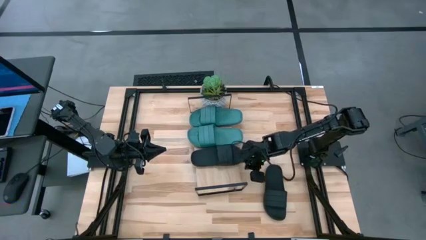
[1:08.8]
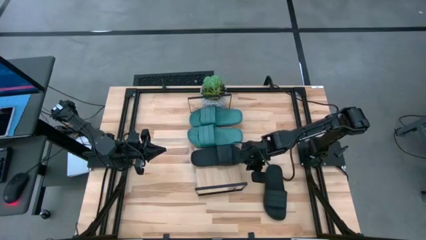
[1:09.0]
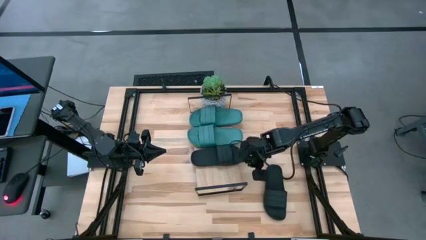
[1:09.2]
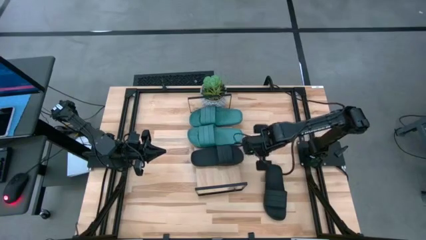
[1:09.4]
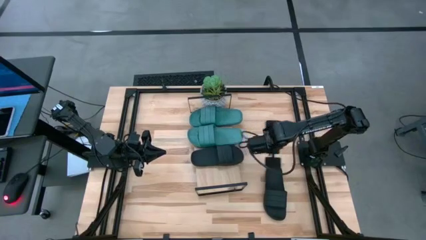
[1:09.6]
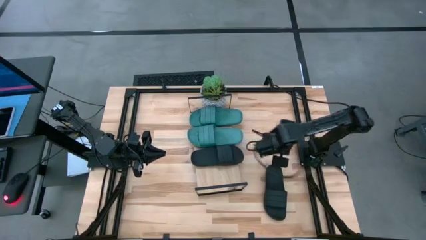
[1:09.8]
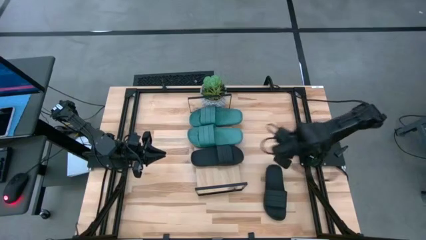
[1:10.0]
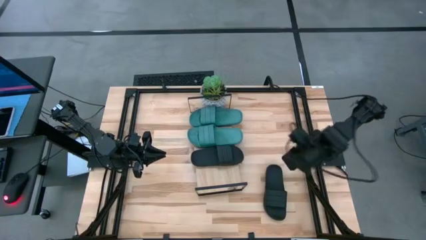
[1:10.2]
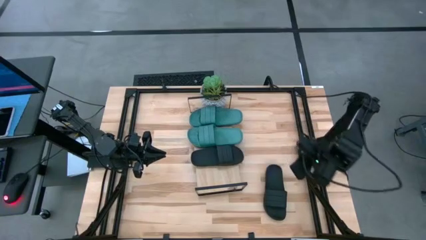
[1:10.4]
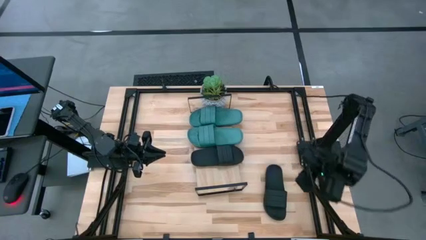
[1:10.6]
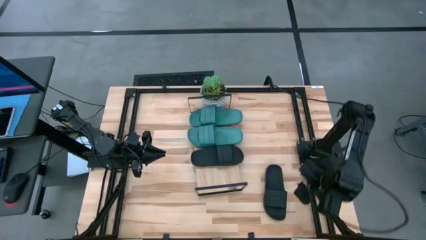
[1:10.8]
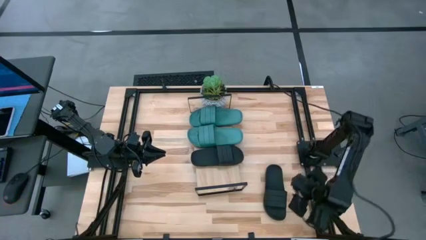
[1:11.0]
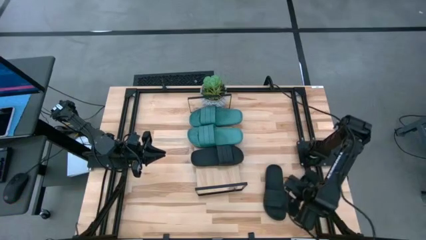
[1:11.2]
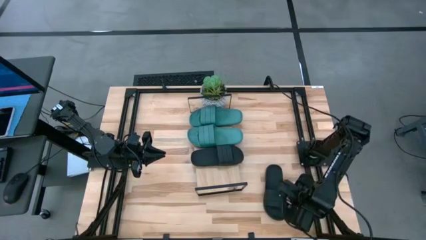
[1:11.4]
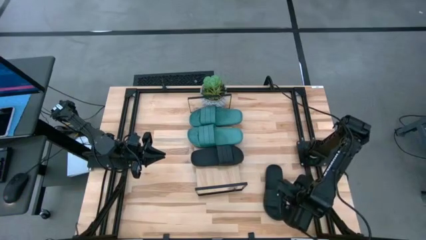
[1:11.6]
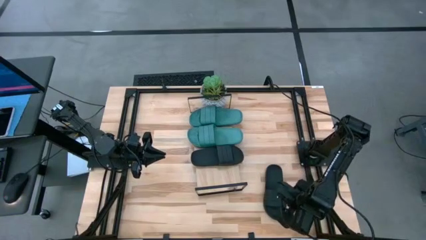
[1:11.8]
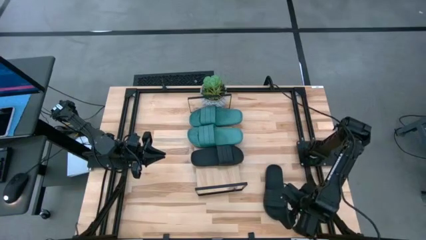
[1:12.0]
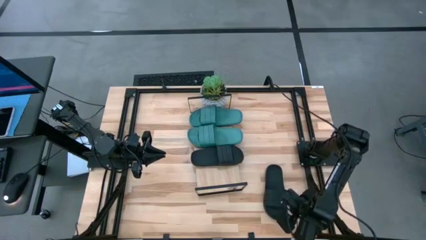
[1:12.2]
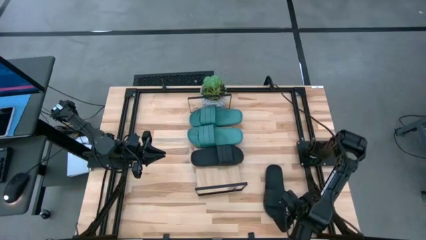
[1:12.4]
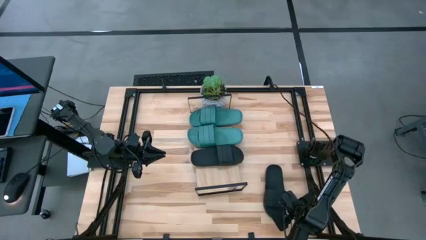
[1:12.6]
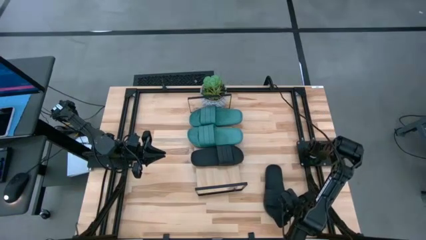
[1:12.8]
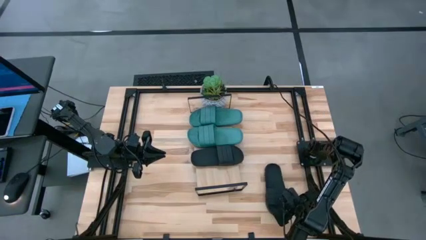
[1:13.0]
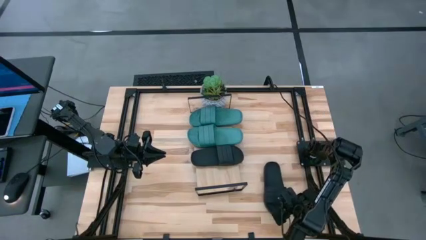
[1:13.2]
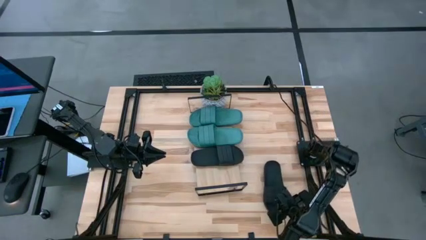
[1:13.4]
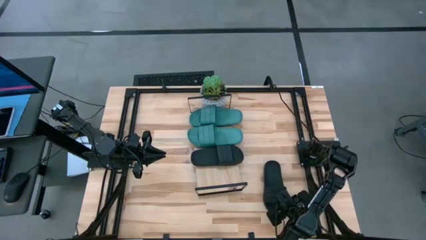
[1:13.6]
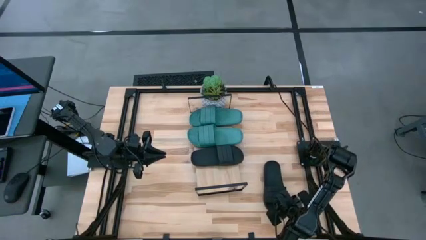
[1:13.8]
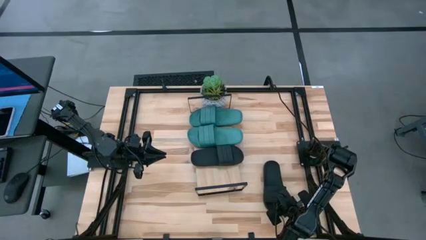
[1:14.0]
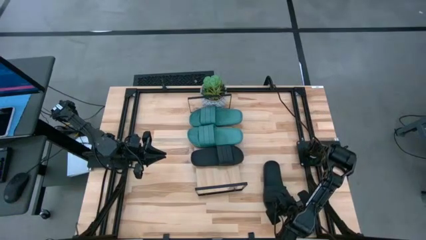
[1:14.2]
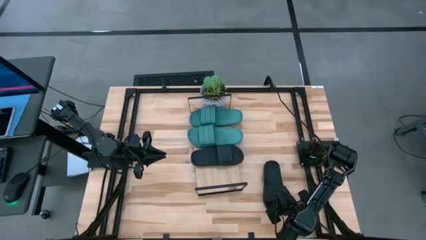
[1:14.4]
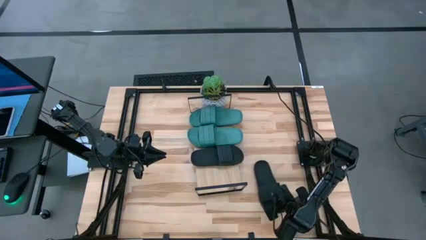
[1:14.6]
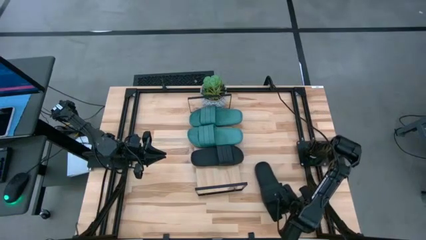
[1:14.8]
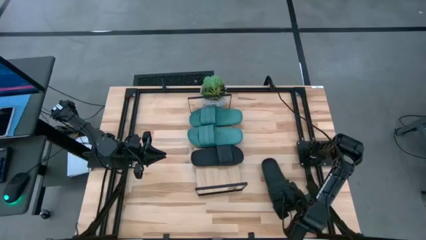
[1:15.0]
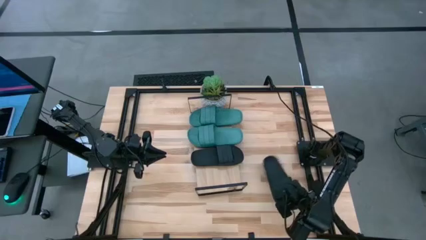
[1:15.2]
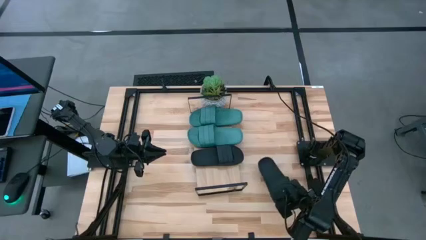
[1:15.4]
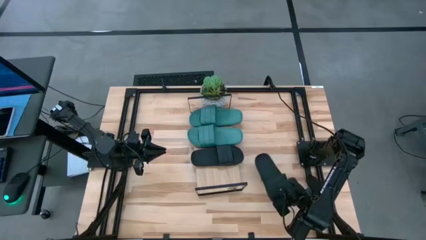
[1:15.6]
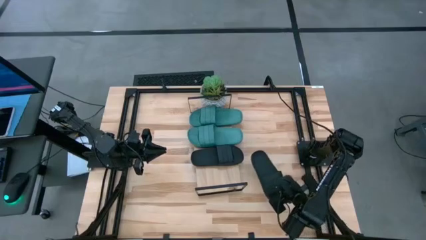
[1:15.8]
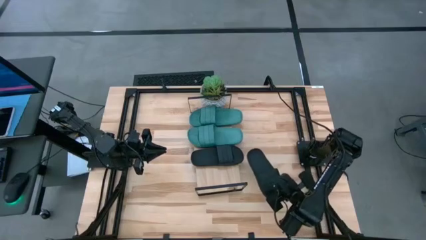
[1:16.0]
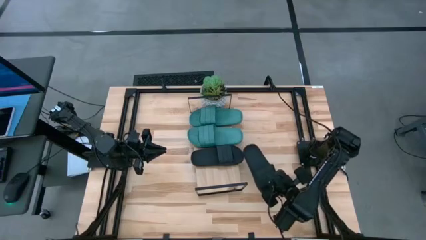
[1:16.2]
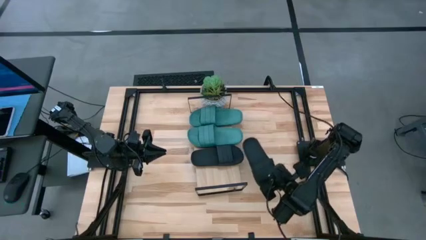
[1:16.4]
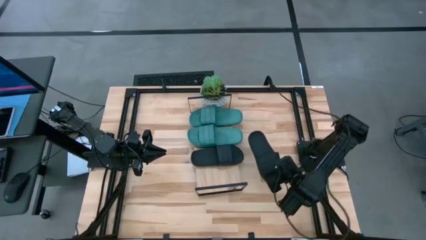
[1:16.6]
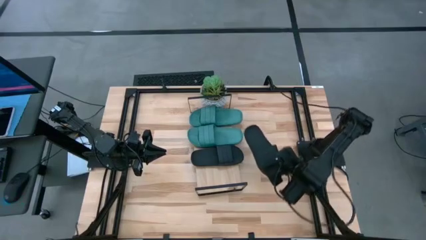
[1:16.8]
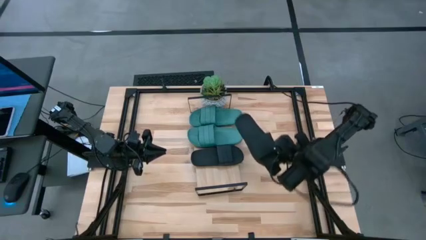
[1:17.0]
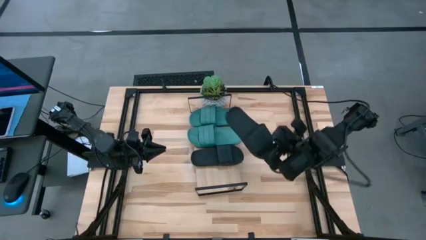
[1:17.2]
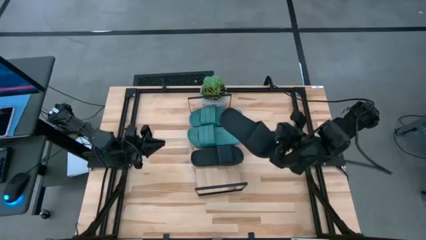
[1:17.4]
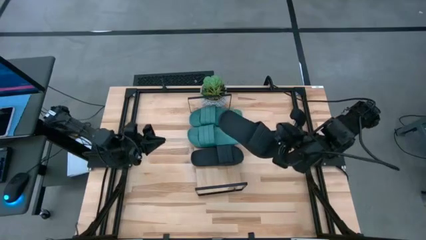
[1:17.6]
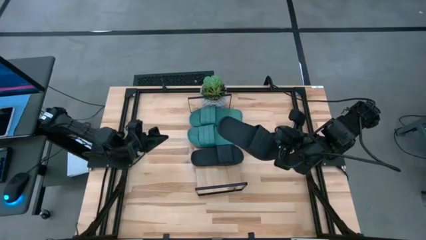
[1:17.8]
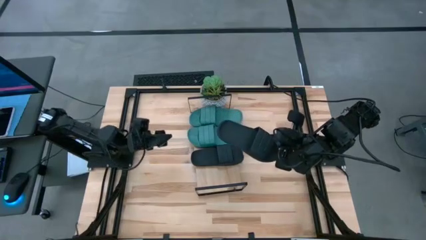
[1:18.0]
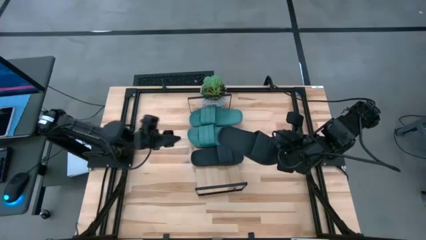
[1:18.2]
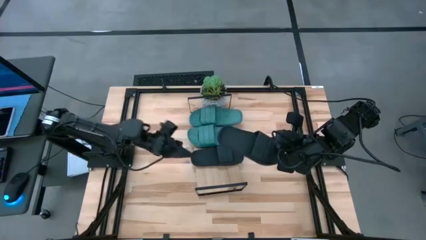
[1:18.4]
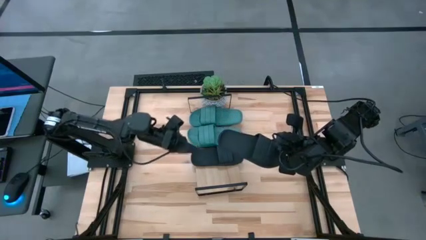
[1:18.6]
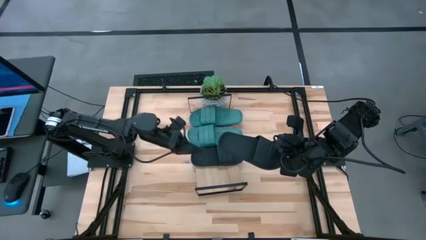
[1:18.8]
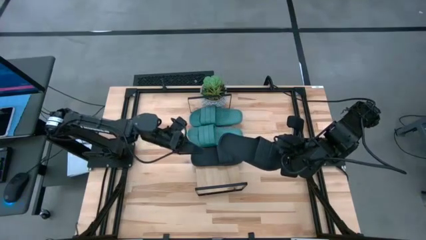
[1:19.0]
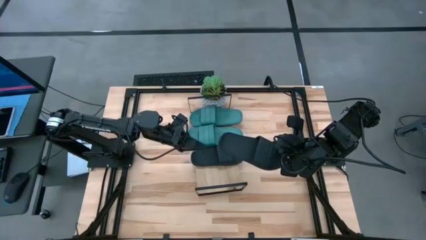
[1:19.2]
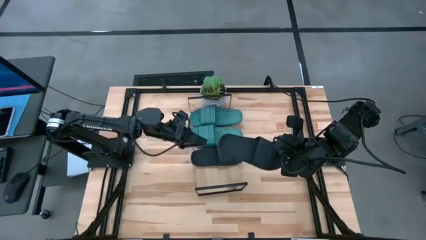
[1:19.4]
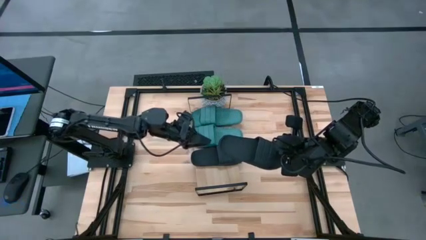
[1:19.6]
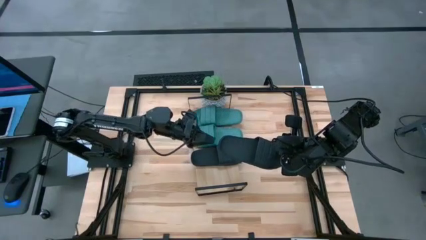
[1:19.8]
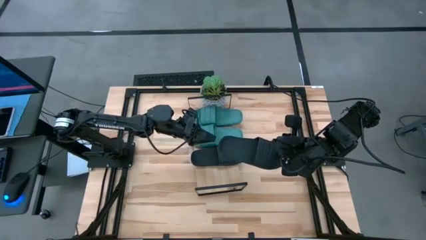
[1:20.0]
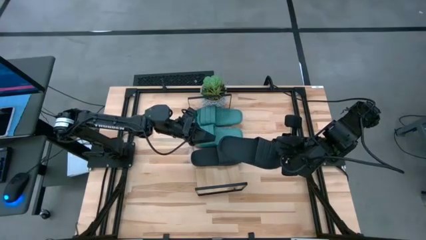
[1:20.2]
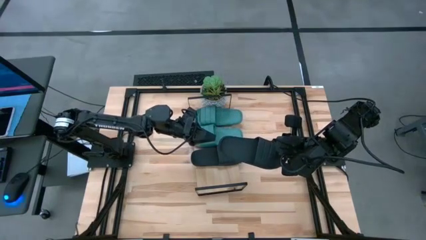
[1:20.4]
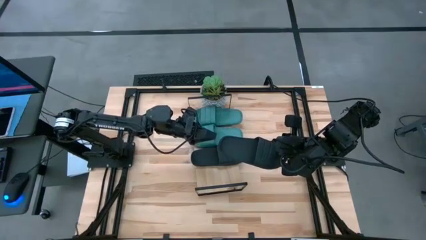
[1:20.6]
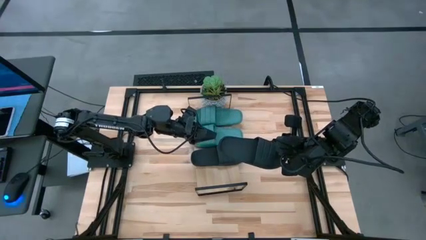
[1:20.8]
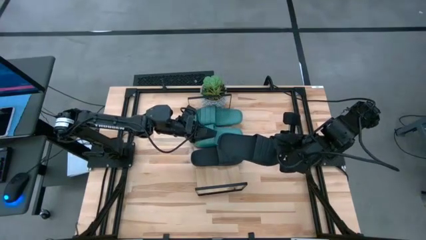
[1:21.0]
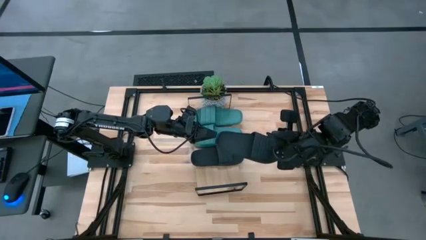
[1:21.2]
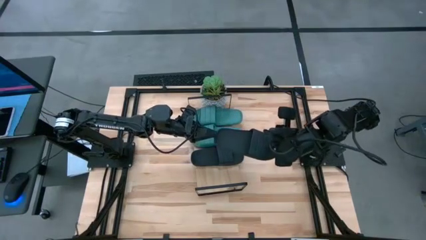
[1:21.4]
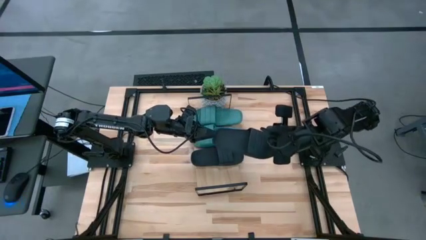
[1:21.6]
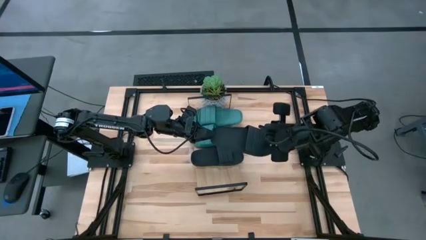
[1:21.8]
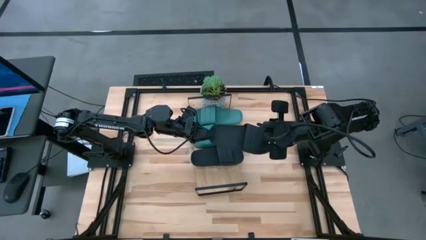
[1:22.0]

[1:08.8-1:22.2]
Task: Pick and place slides into the shelf
Put the black slides on the shelf
